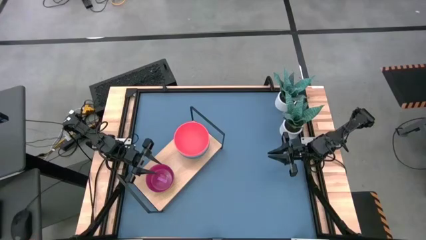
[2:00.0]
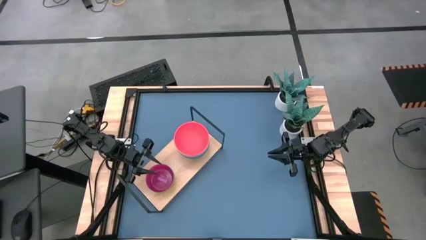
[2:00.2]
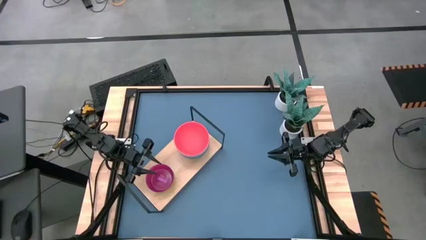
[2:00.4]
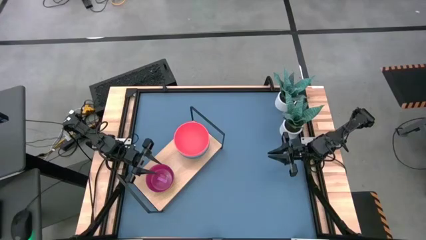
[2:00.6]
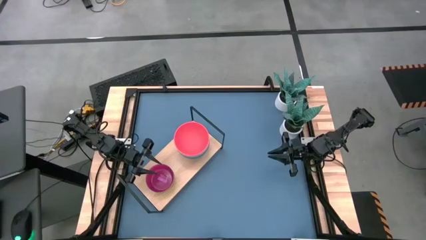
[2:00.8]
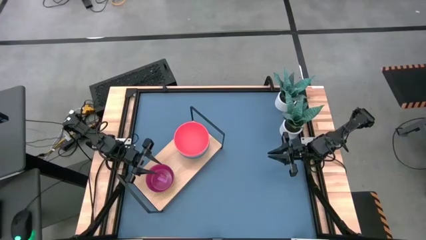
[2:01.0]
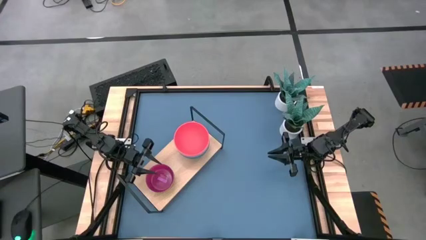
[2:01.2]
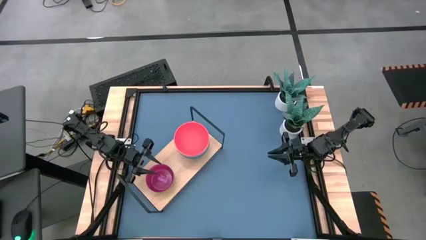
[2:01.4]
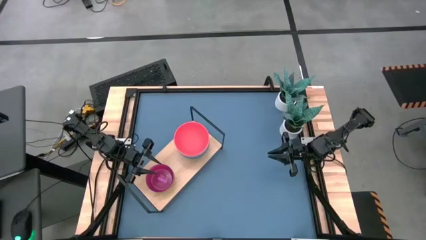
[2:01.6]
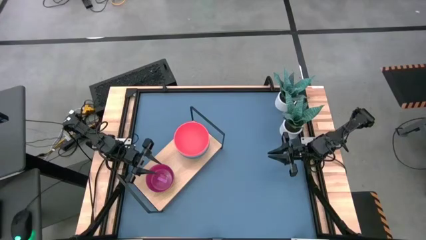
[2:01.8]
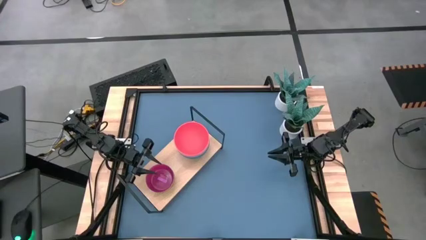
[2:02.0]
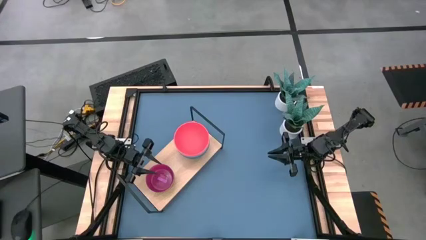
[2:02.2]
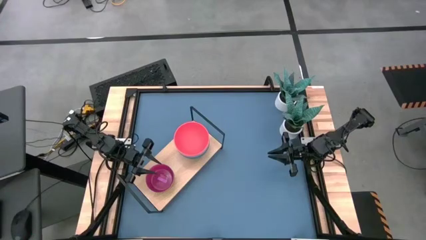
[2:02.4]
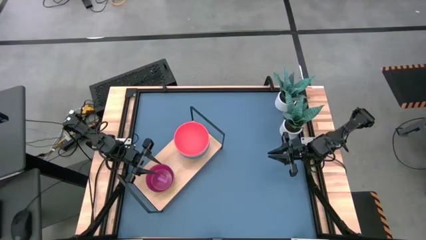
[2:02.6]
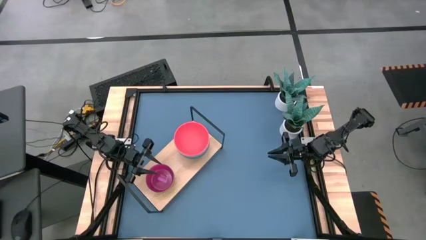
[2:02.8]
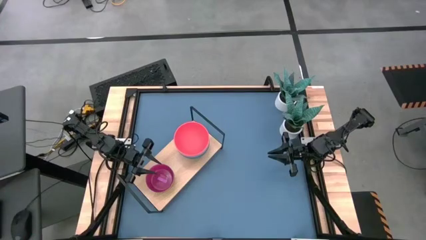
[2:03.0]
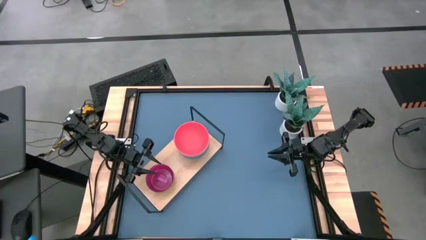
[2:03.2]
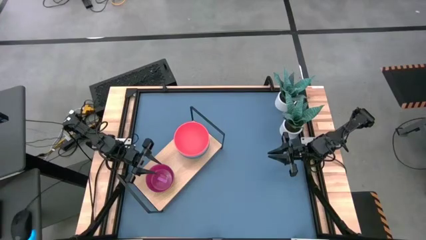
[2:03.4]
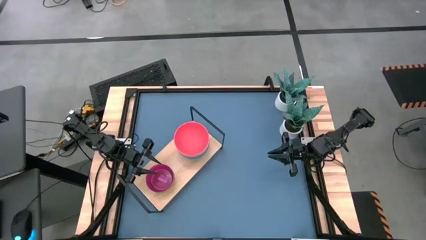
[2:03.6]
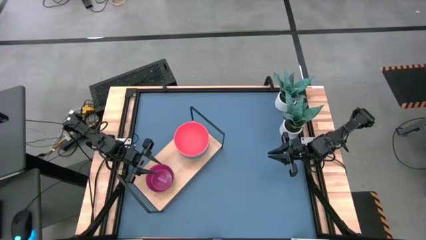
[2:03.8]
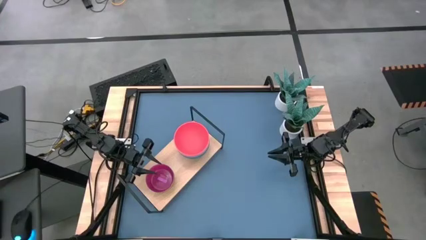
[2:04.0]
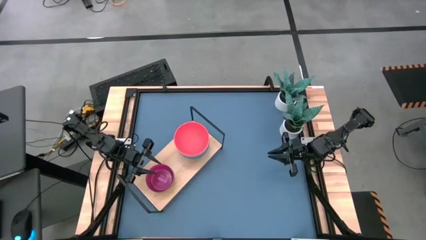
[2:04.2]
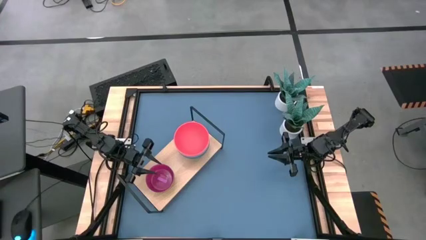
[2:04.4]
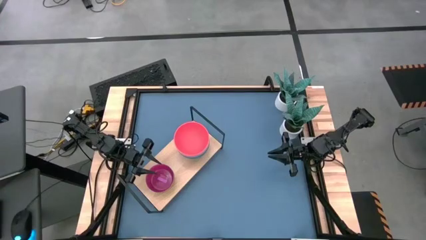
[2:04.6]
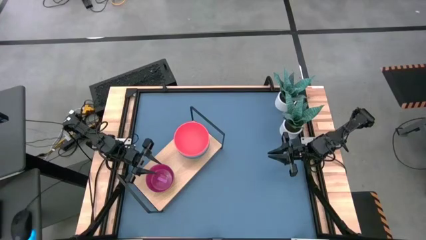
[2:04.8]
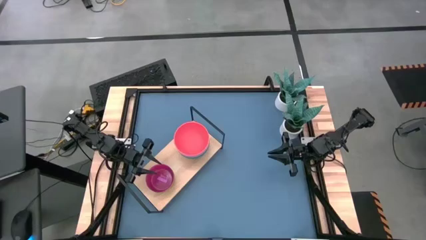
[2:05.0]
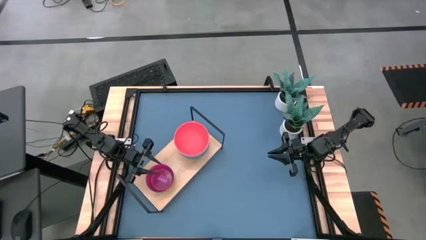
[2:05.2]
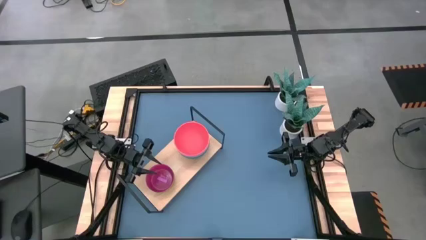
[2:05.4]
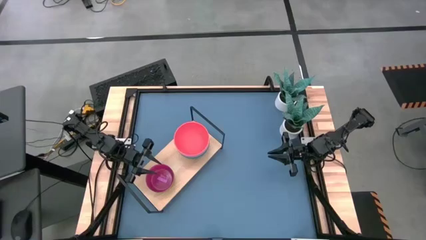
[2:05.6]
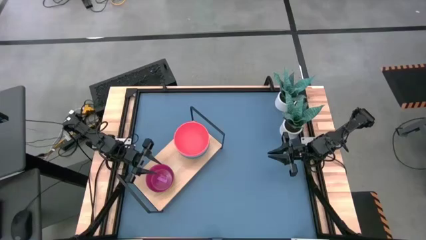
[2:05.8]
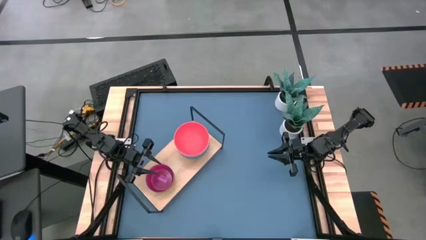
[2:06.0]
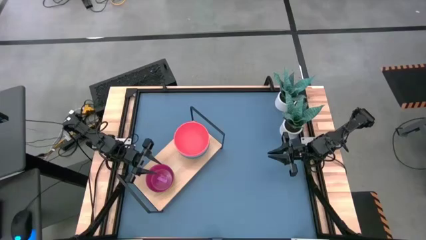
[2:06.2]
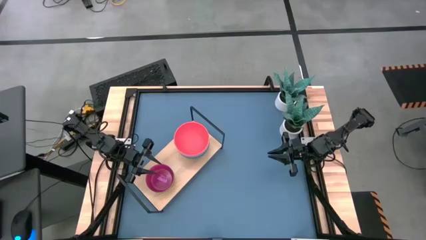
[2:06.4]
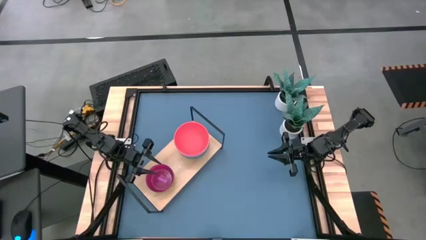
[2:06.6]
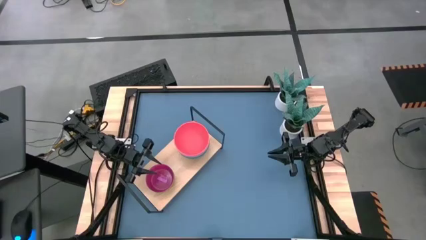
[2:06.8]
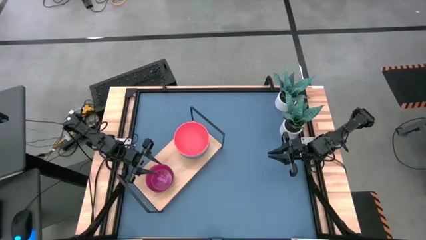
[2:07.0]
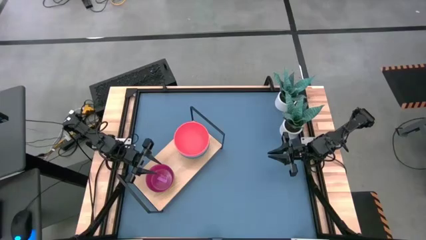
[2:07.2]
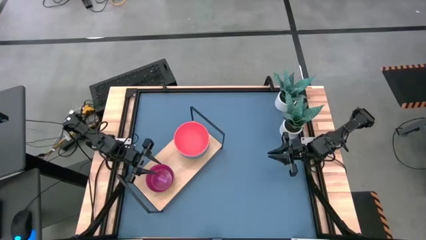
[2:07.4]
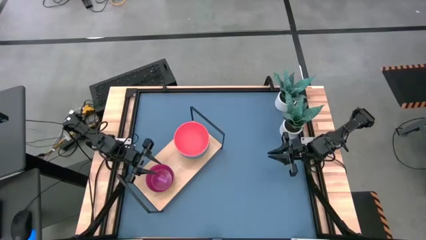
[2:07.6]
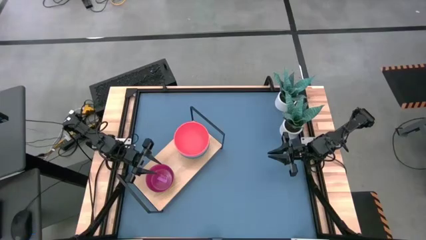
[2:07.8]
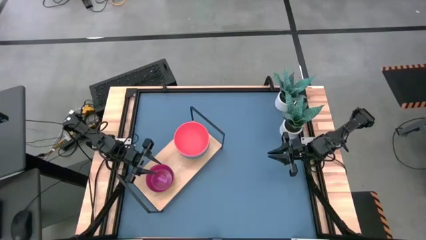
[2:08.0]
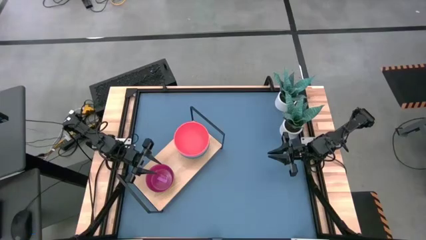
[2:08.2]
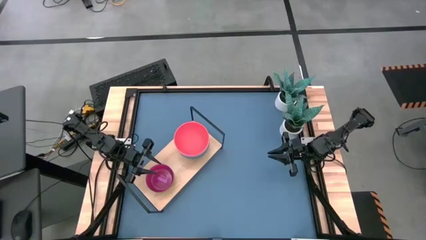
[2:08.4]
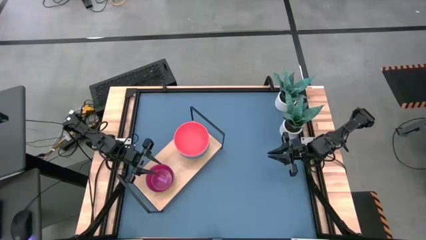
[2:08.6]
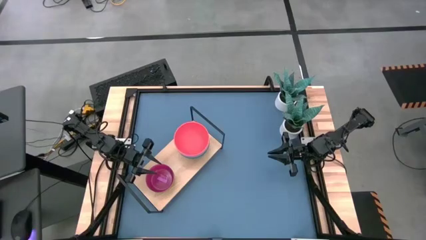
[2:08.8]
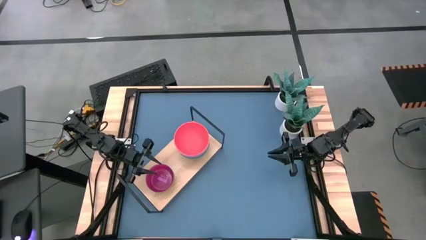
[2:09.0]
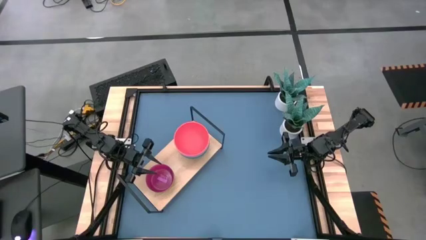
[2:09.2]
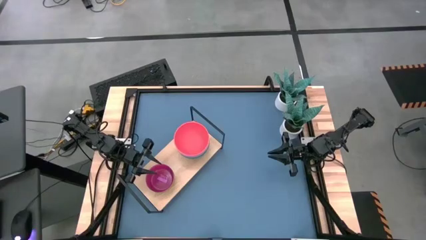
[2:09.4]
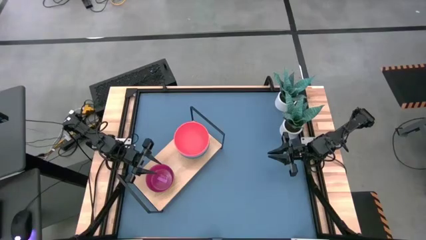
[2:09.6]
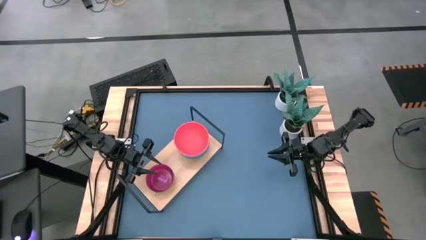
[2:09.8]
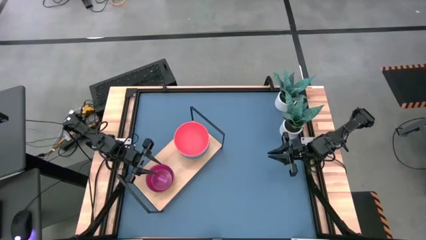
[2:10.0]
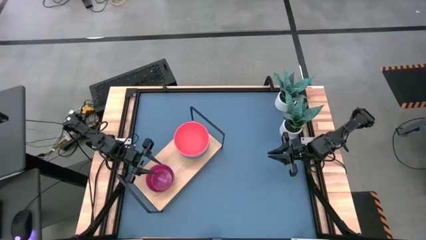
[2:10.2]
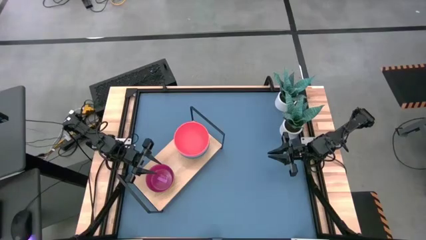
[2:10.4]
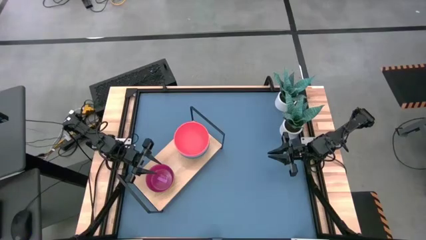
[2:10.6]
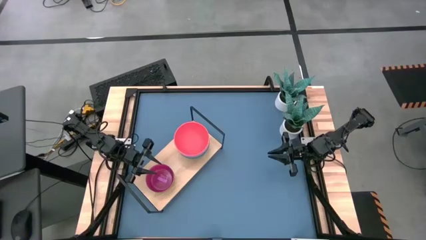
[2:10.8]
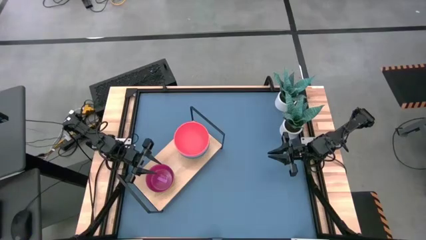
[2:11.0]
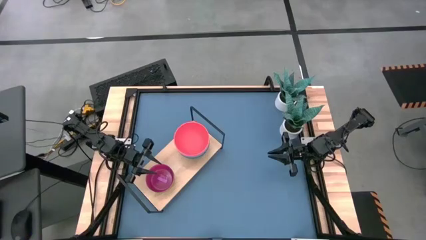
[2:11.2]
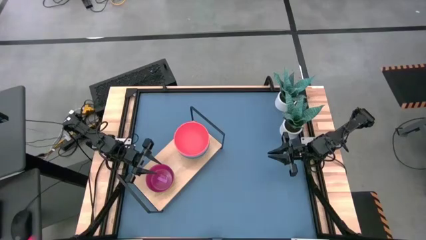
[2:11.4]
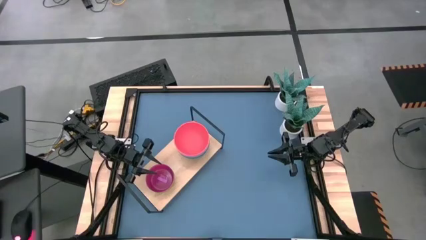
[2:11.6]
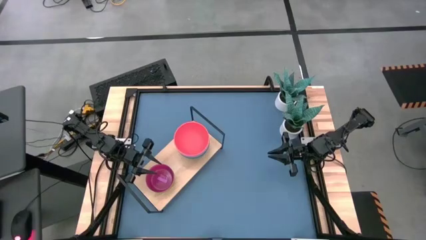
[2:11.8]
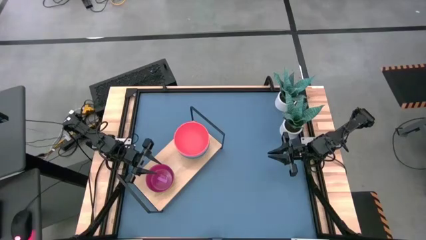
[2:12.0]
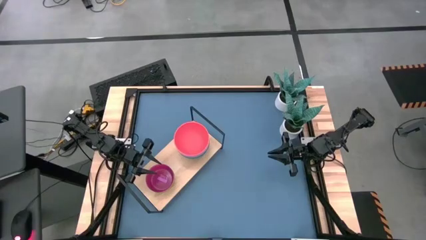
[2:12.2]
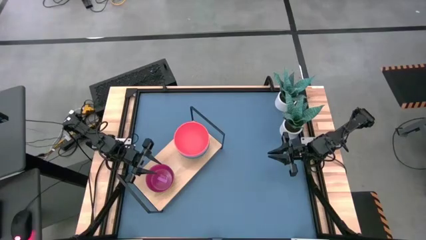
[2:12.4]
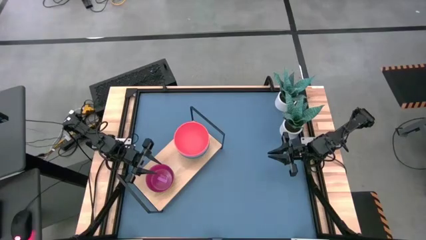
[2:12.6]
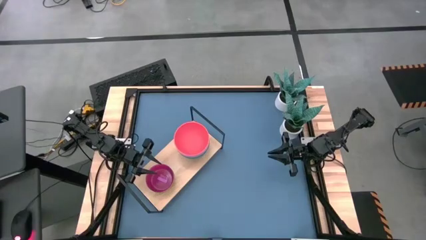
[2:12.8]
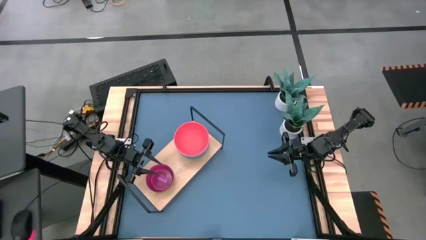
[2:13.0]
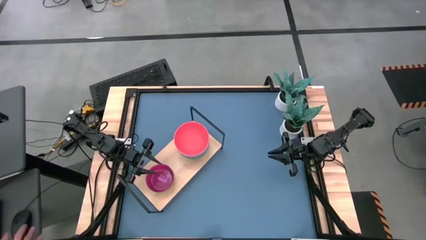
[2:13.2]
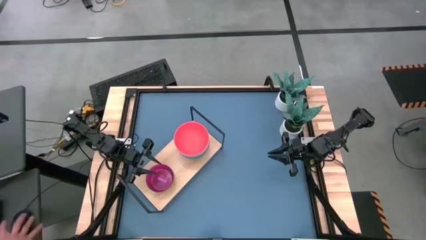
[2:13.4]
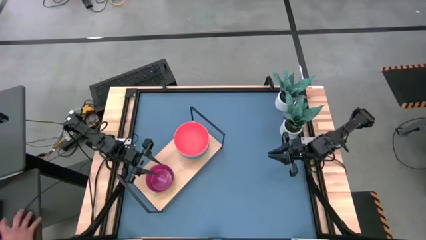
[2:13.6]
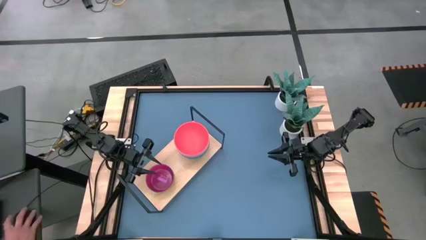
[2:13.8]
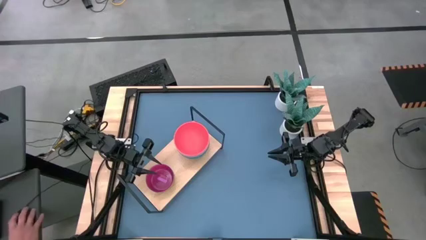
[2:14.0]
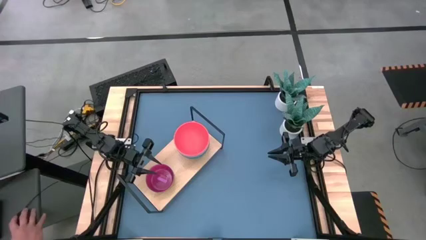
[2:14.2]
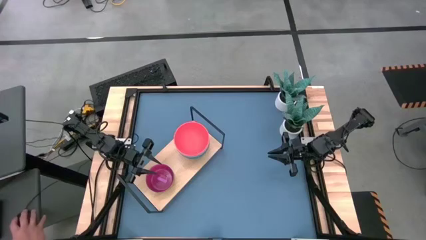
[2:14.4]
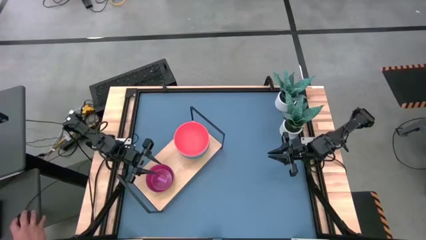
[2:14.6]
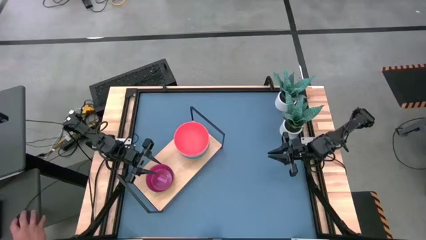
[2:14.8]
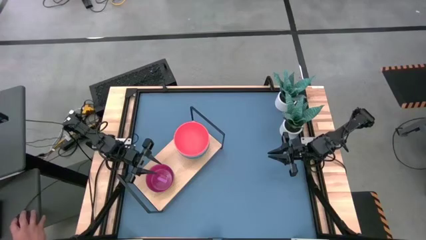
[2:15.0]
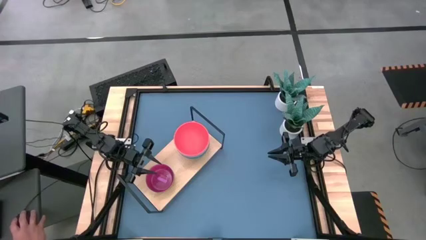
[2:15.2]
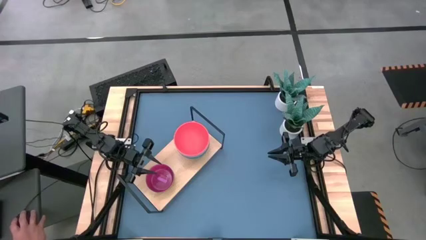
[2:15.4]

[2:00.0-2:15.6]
Task: Place and stack bowls onto a shelf
Return to Home Position
